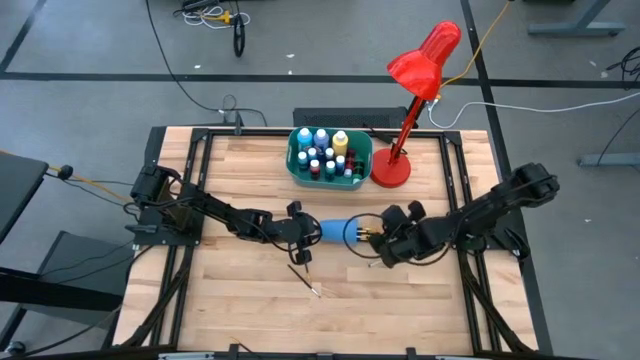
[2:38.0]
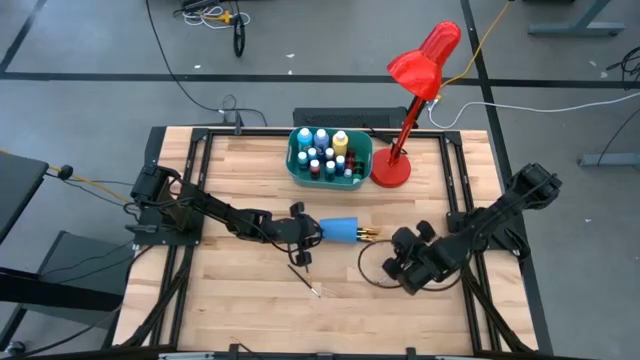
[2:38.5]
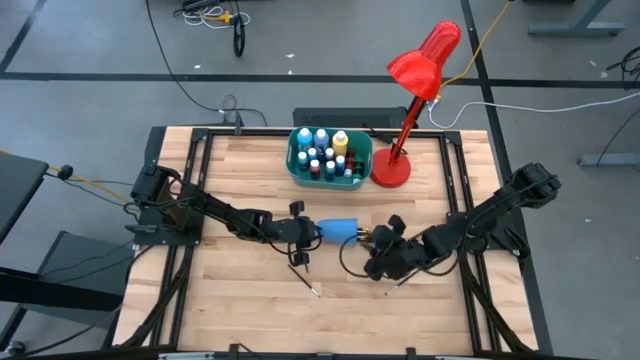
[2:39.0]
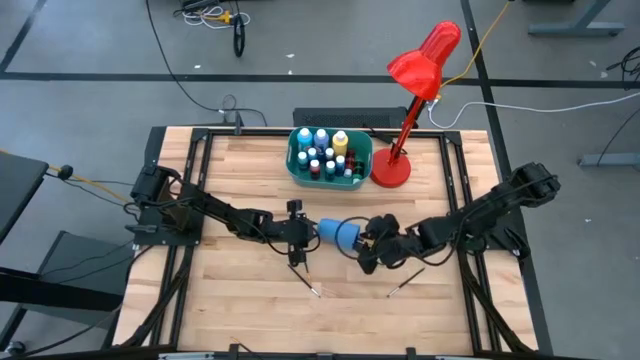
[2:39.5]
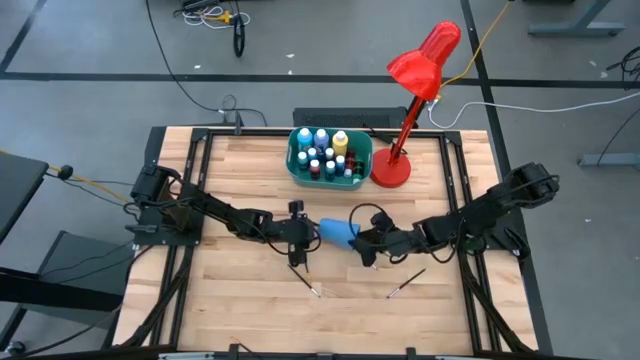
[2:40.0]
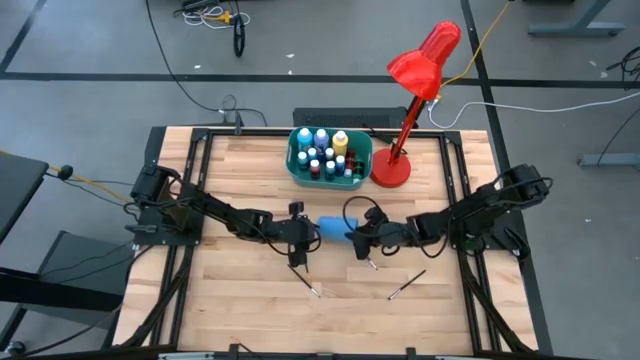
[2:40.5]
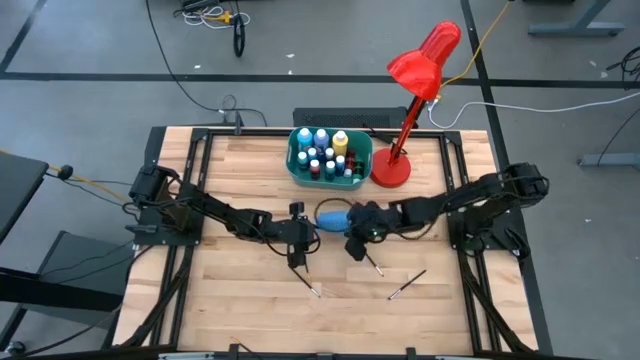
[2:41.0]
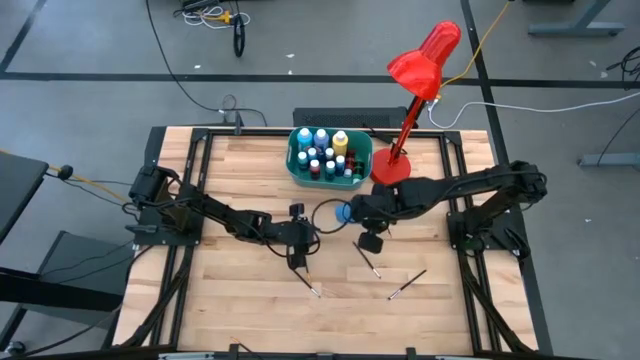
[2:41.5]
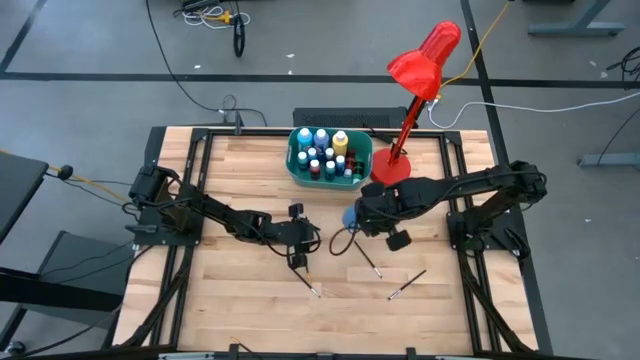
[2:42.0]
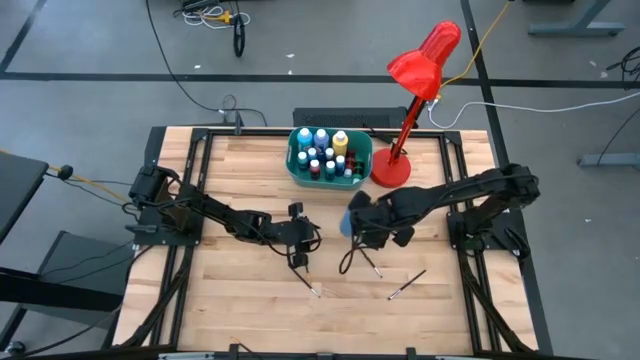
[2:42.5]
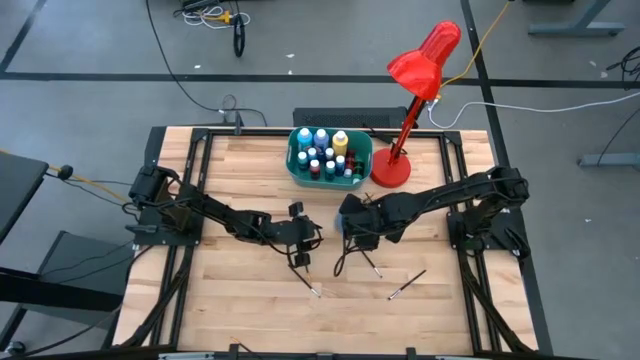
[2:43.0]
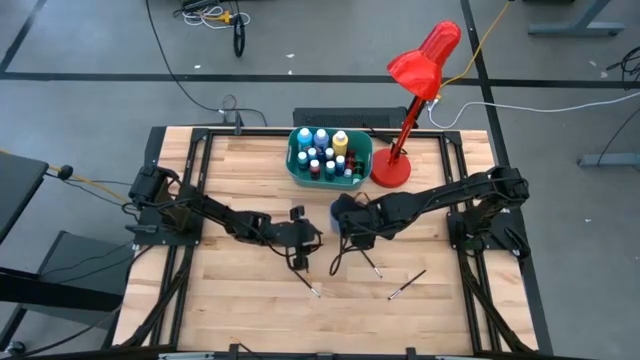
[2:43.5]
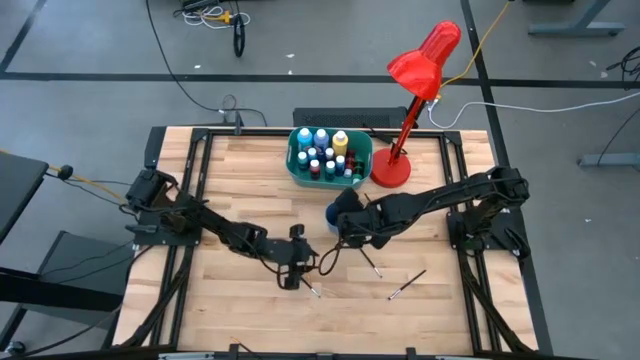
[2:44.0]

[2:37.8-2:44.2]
Task: Pick & Place Paint Supplies
Adjust the blue cup

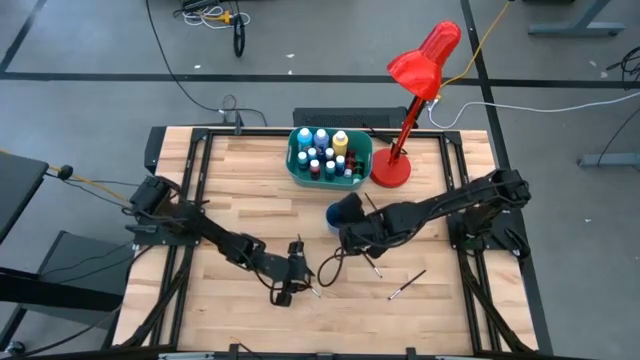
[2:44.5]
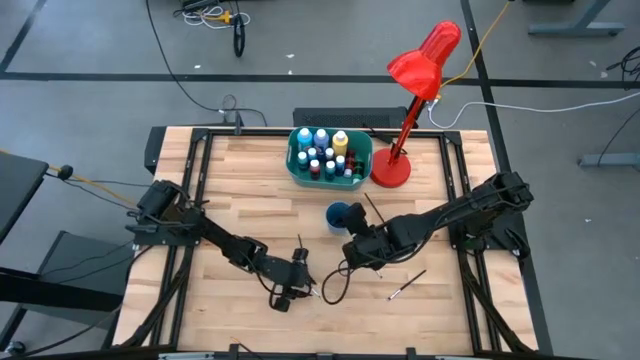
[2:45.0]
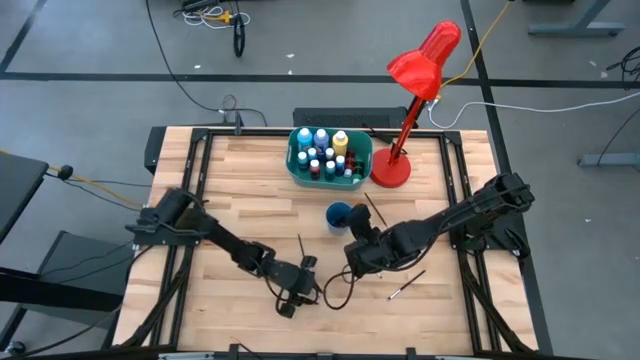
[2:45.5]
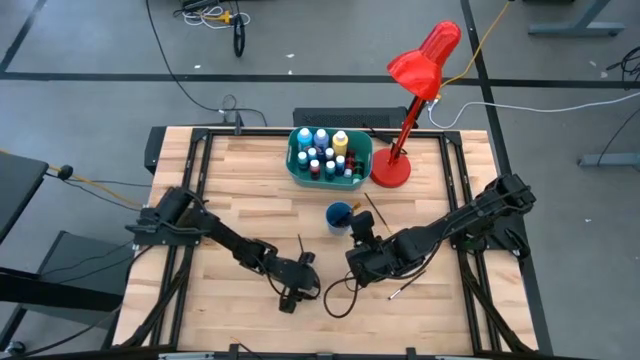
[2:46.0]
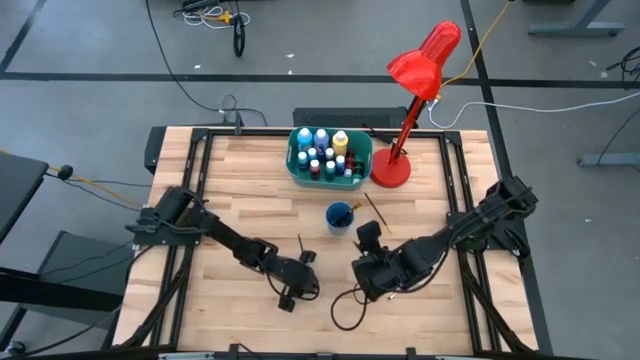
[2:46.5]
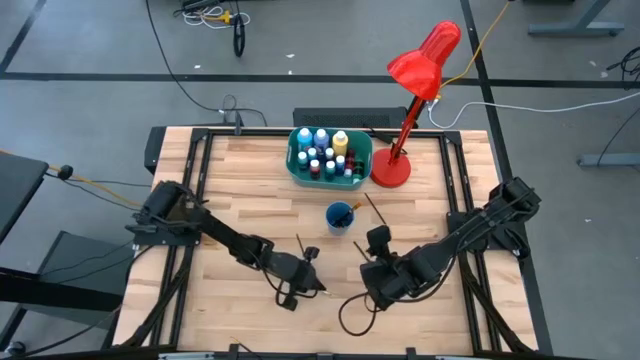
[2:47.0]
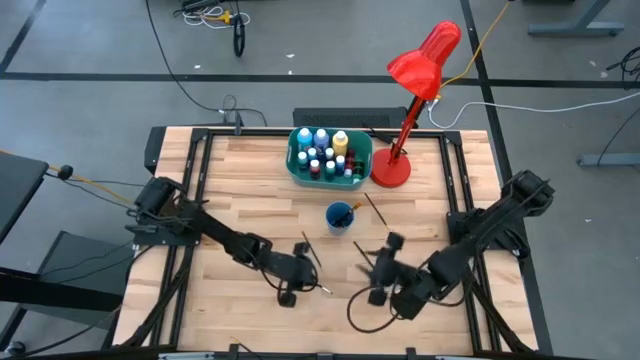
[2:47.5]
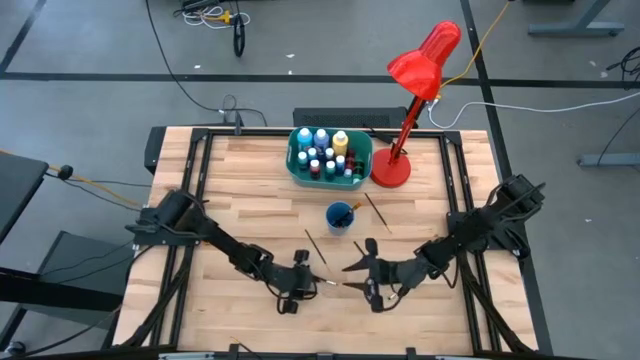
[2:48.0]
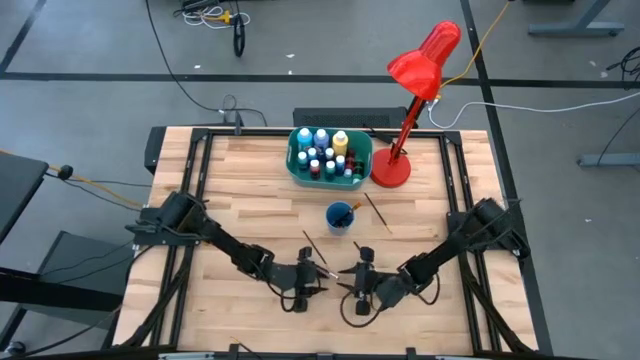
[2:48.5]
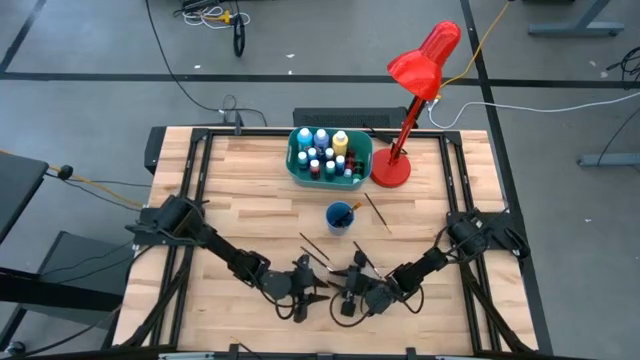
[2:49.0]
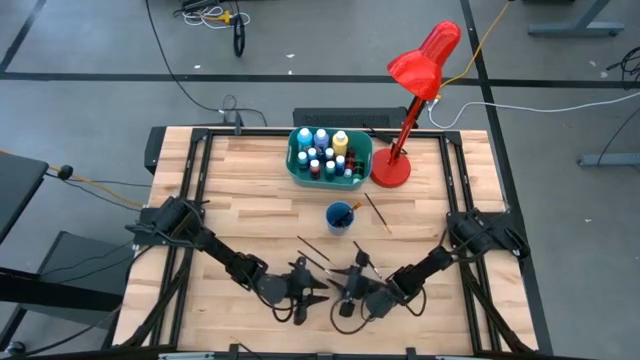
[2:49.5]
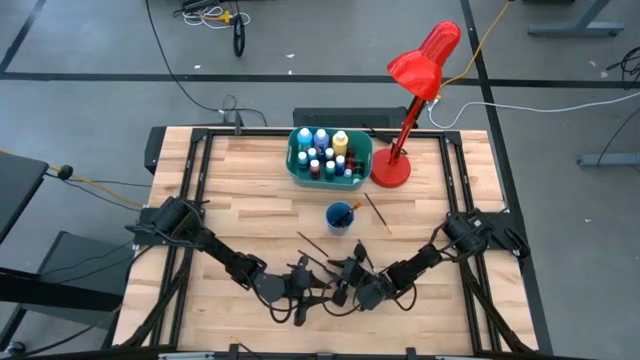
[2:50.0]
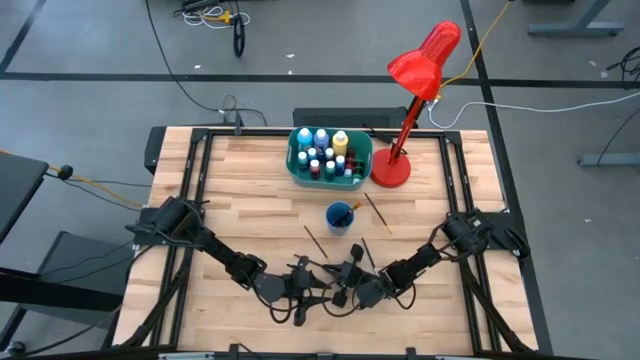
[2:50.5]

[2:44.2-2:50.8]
Put the silver paint brush into the blue cup

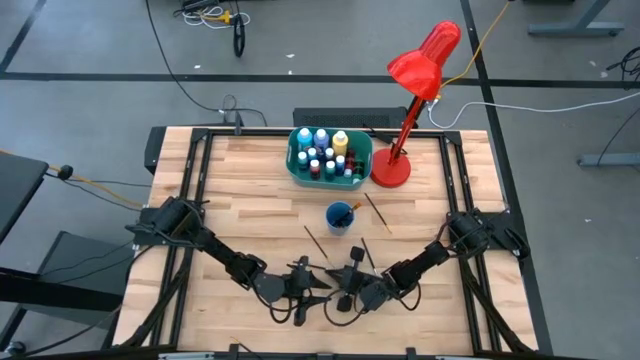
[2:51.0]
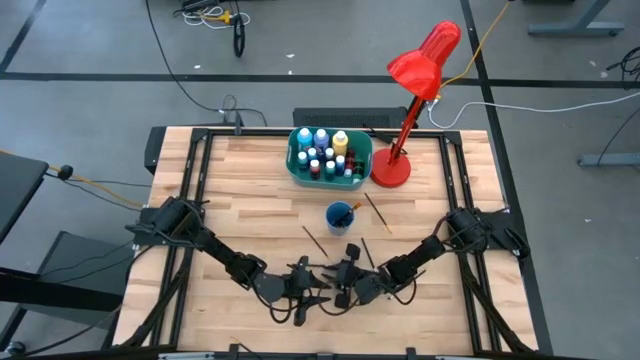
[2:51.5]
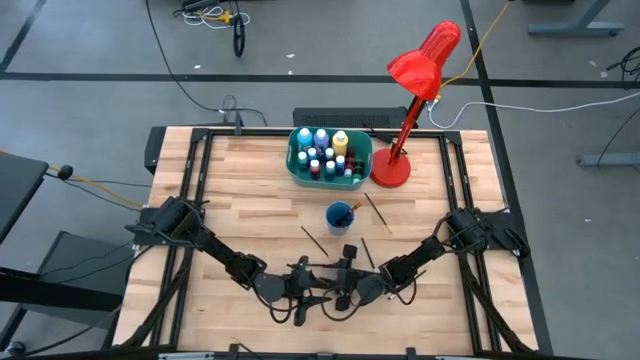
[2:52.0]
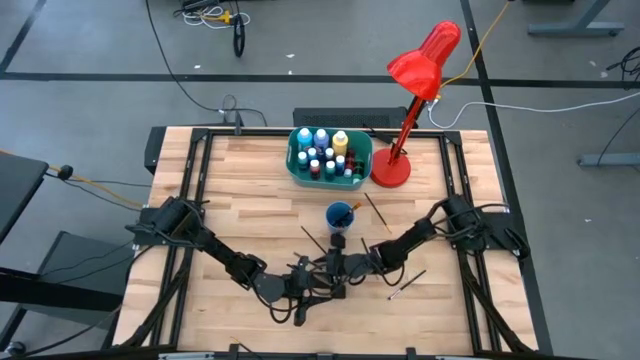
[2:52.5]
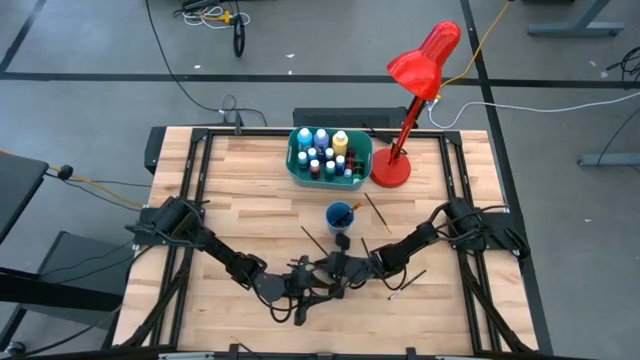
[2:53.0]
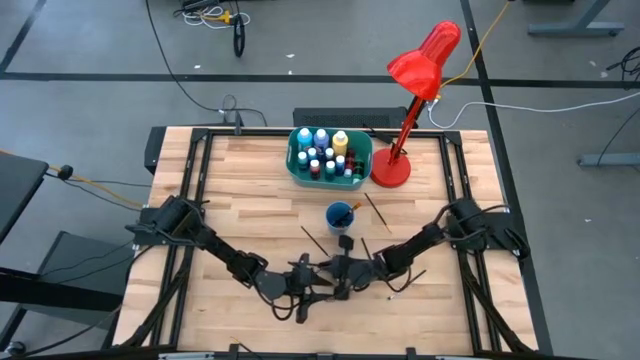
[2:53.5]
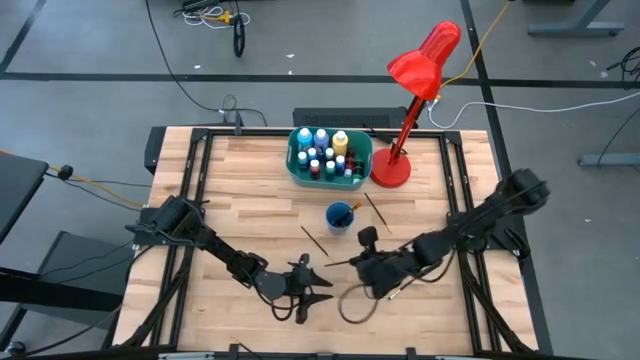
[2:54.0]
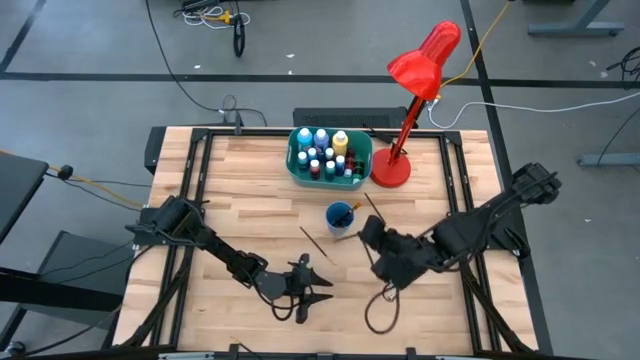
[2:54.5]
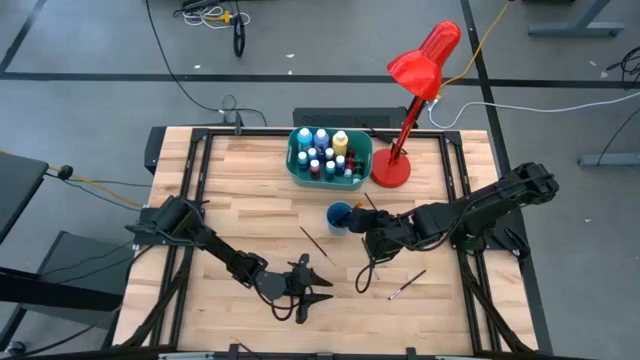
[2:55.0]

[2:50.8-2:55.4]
Put the silver paint brush into the blue cup

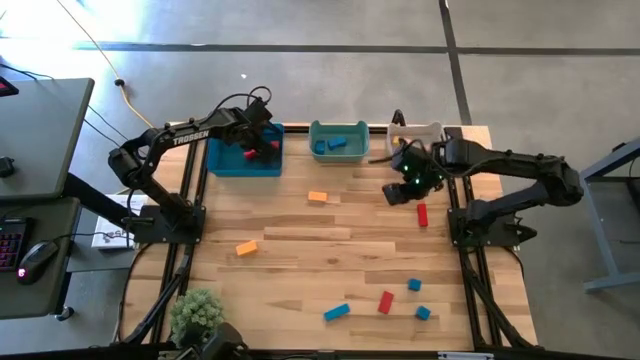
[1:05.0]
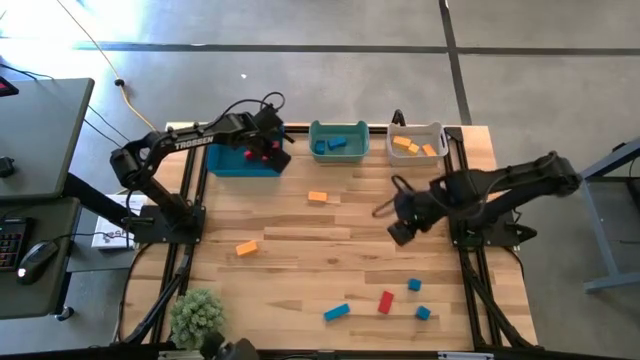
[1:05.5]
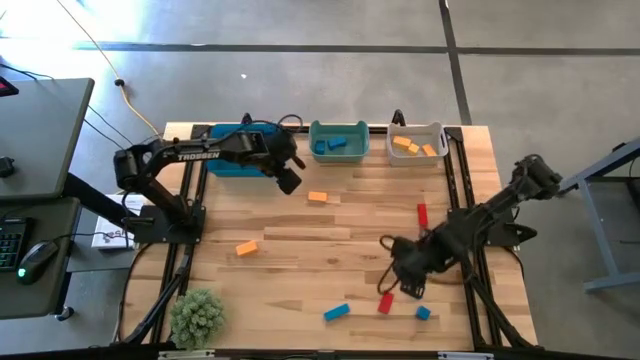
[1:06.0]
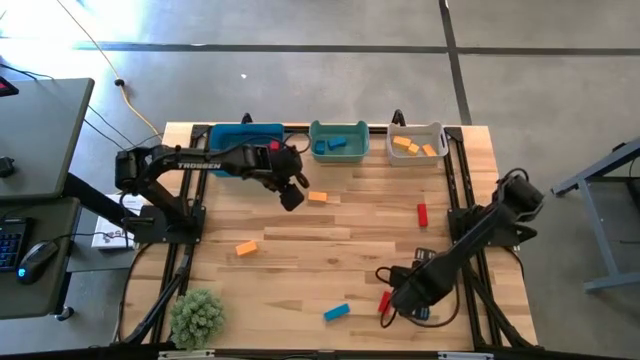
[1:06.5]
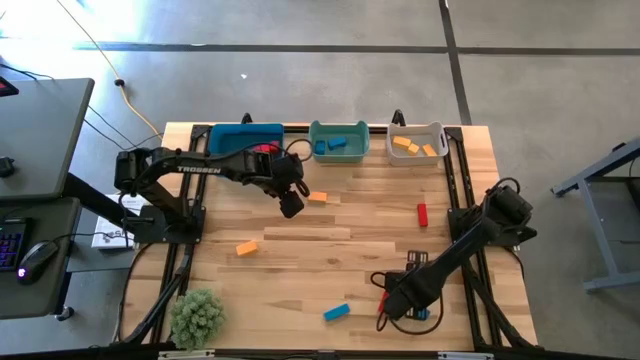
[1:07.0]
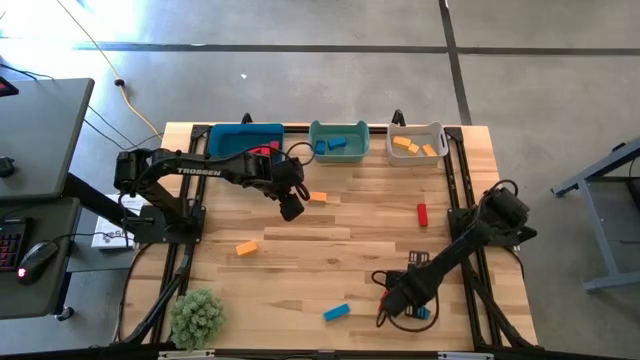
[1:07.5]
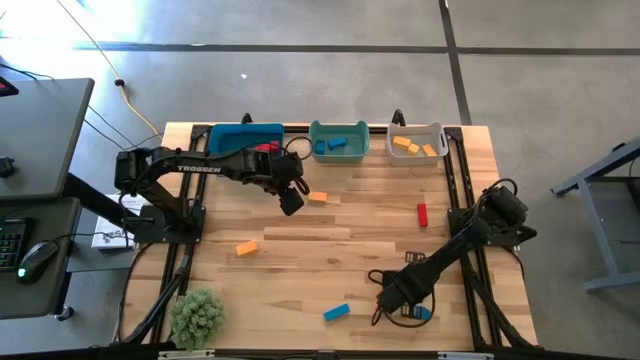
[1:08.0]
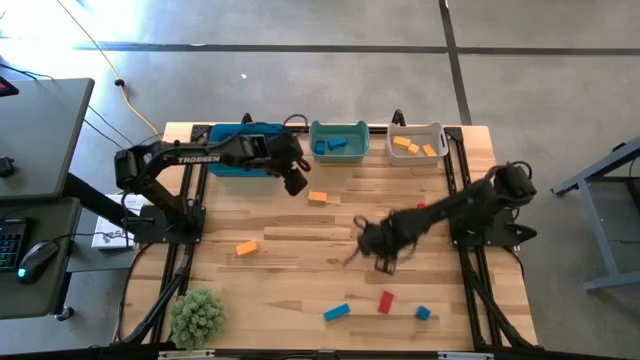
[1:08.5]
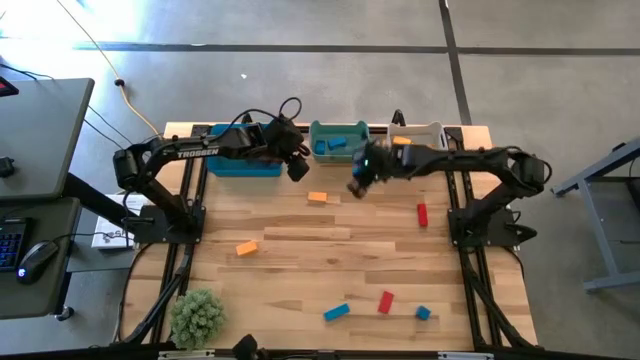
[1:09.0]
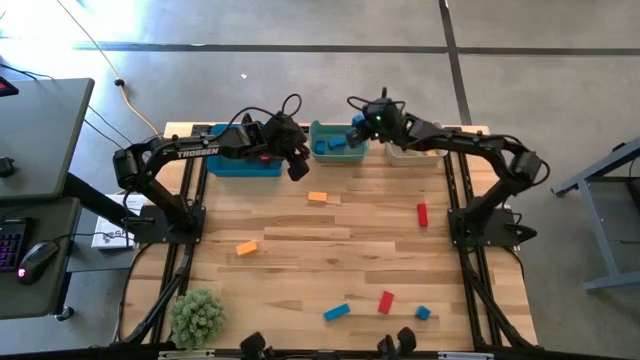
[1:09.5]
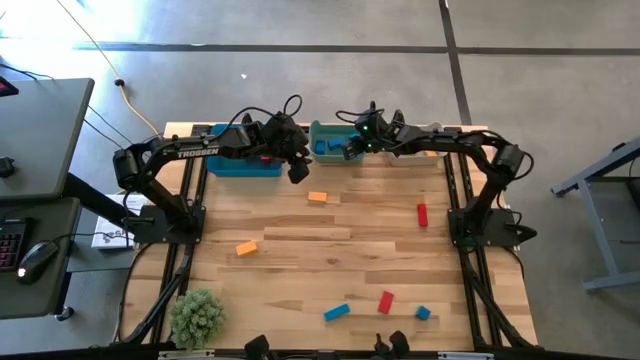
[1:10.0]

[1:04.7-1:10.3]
Task: Sort & place blocks by color
Put the blue block into the green bin
